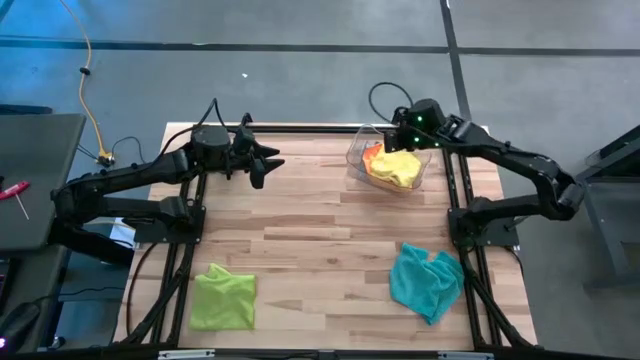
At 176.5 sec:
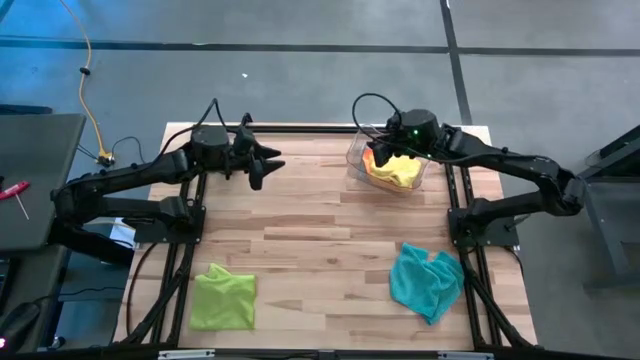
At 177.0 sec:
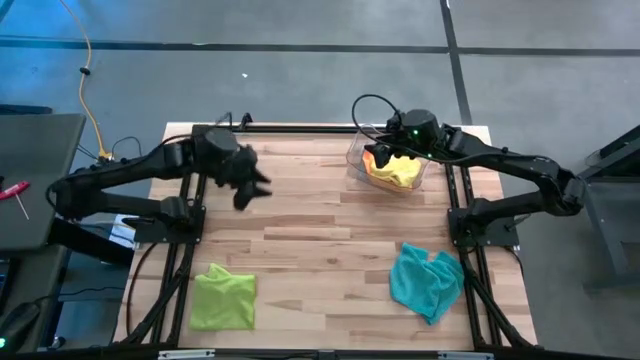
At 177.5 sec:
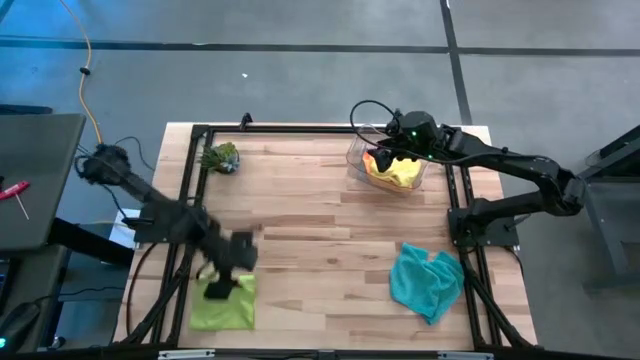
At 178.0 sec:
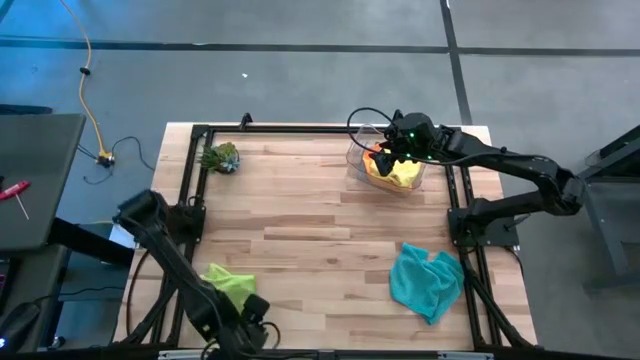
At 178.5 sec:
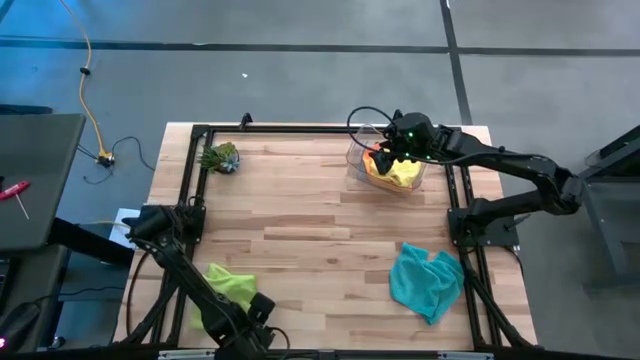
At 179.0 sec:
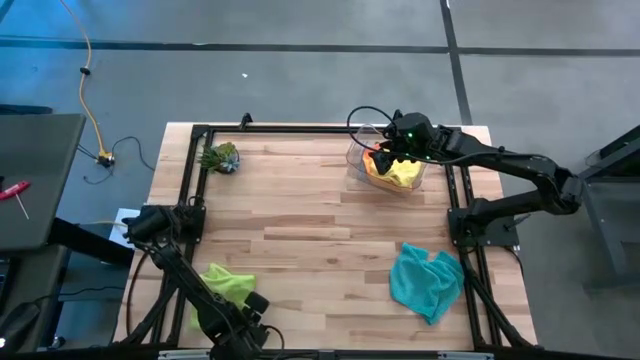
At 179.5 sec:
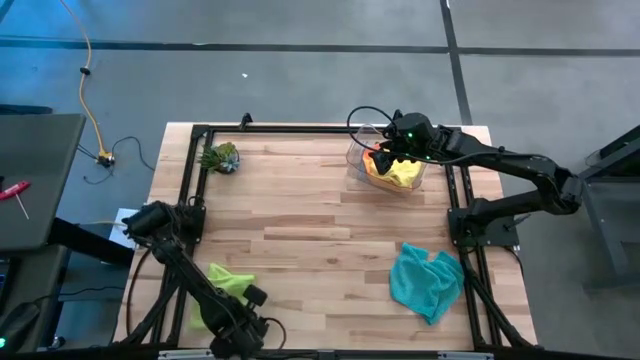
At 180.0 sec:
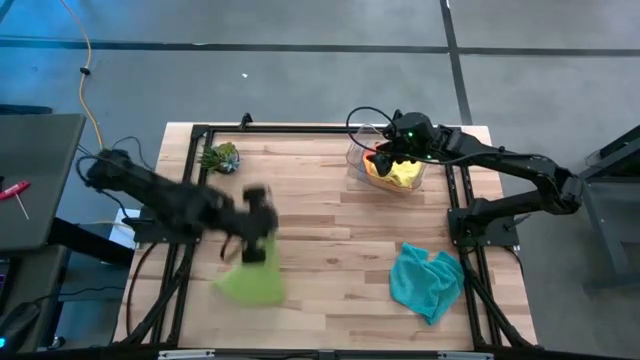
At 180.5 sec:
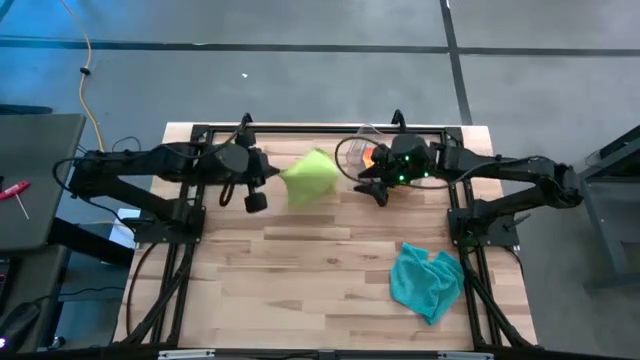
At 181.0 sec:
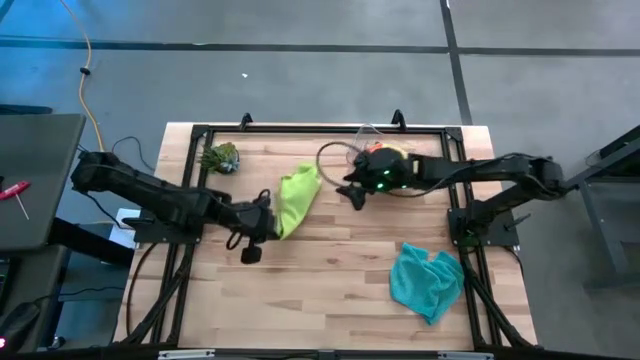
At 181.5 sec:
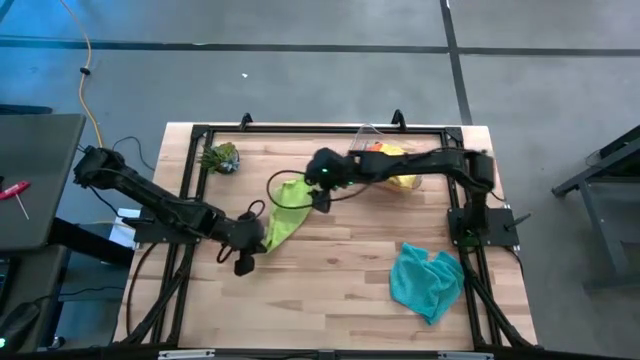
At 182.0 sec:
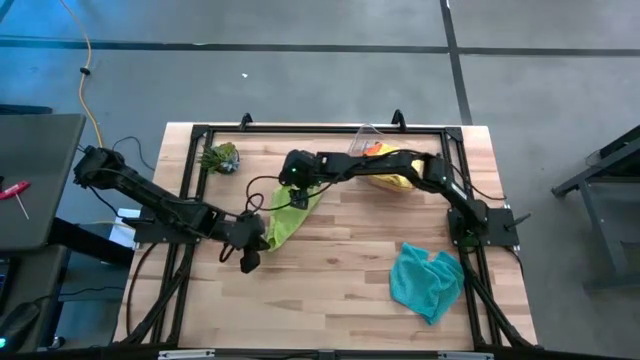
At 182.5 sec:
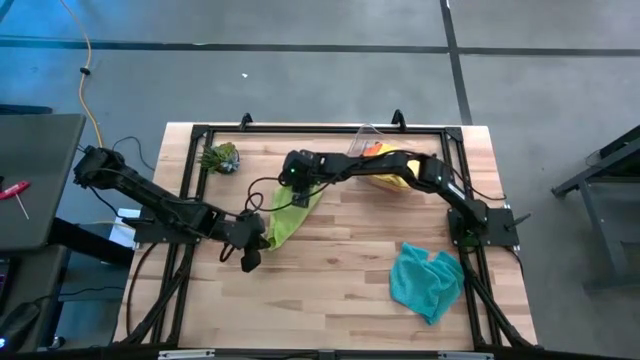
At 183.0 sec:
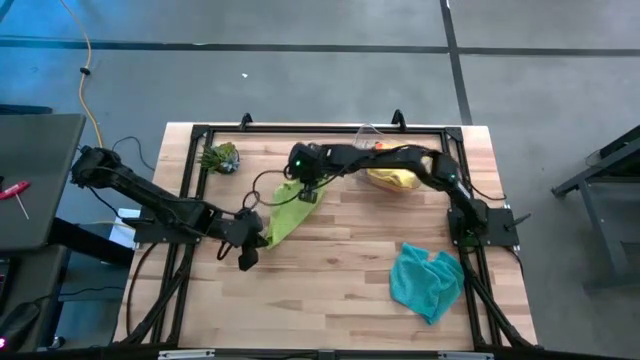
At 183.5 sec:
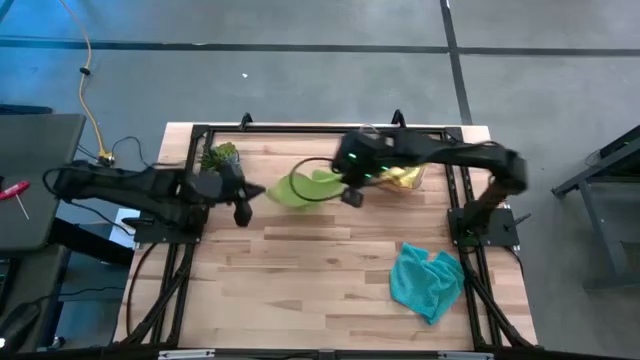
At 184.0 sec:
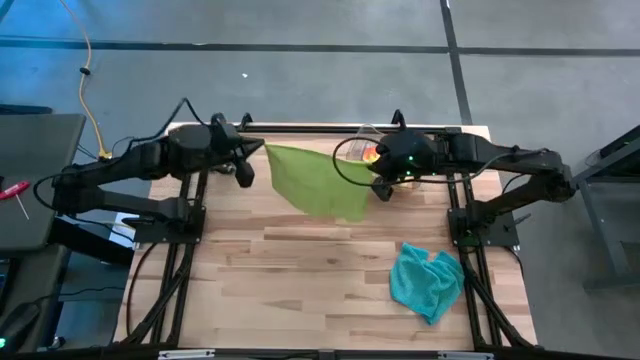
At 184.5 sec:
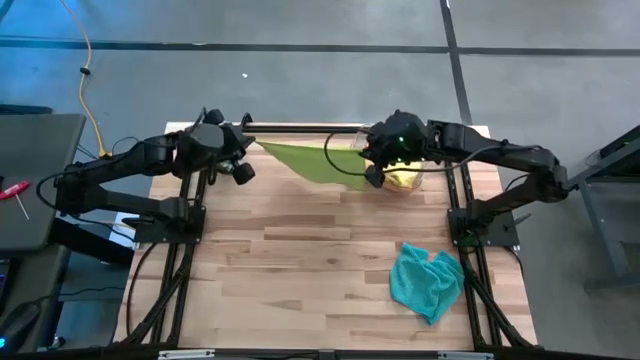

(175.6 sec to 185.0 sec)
Task: Fold microfiber towels
Fold the green microfiber towel

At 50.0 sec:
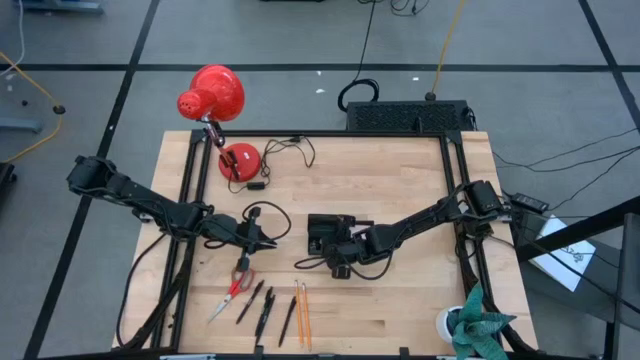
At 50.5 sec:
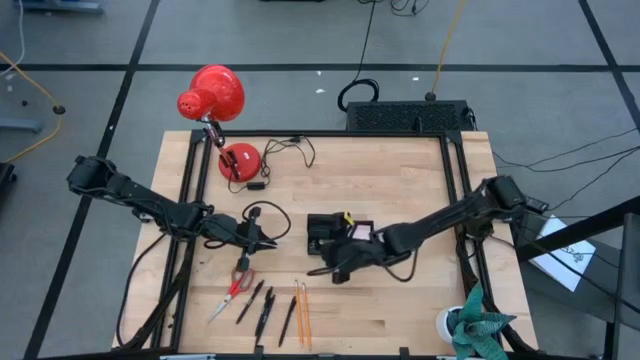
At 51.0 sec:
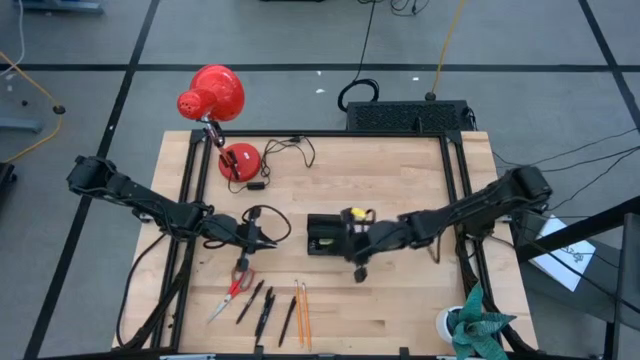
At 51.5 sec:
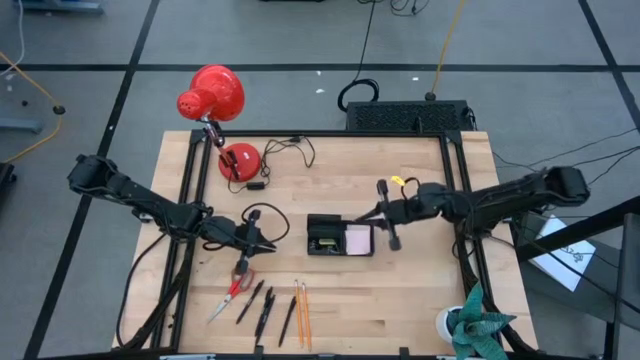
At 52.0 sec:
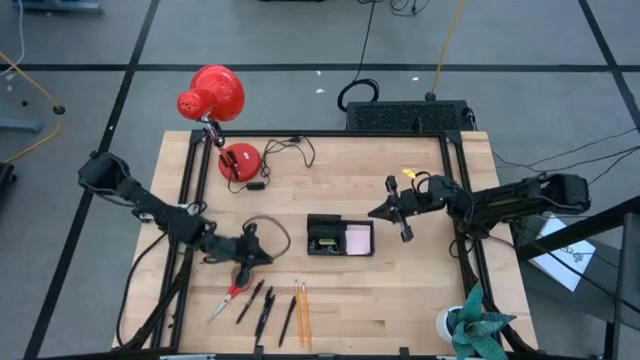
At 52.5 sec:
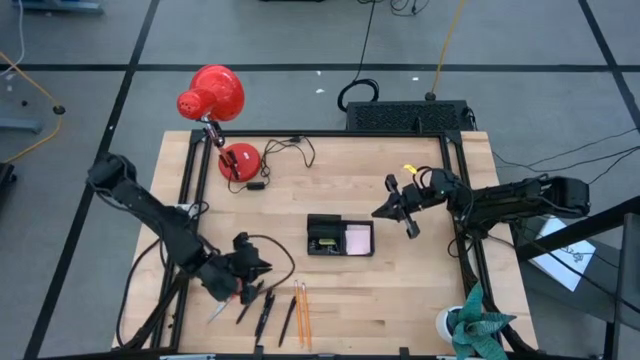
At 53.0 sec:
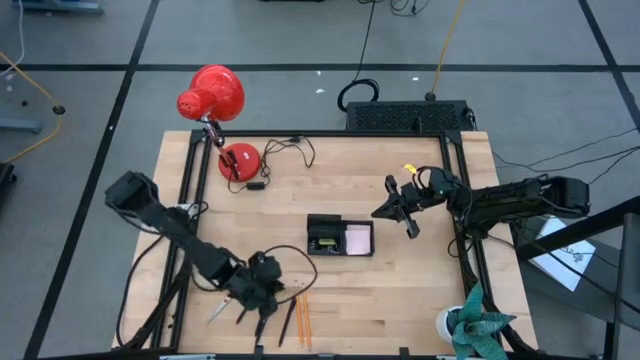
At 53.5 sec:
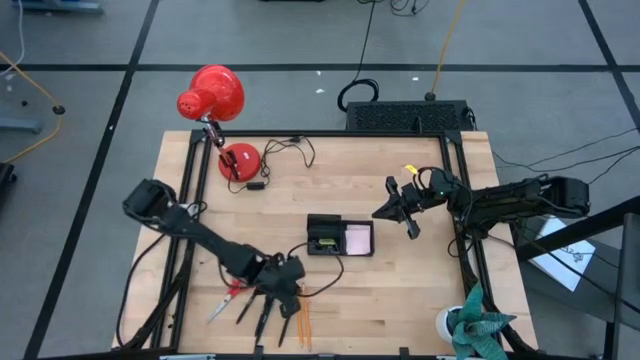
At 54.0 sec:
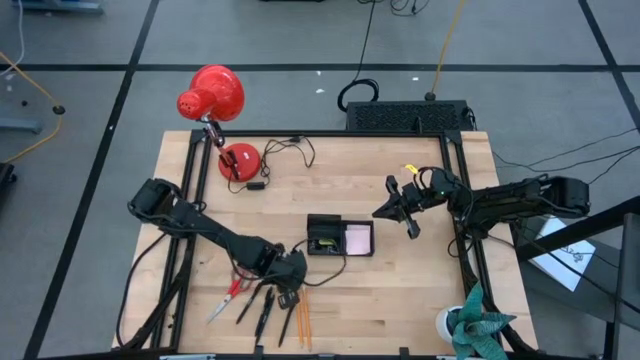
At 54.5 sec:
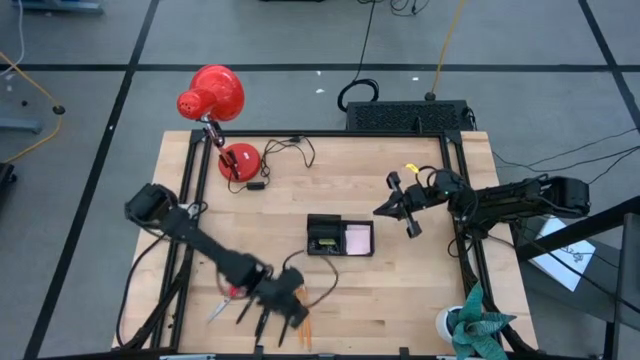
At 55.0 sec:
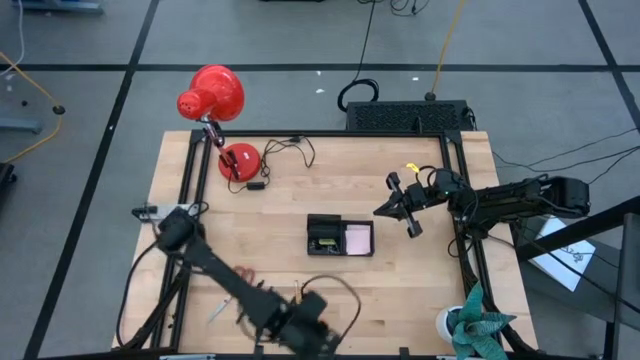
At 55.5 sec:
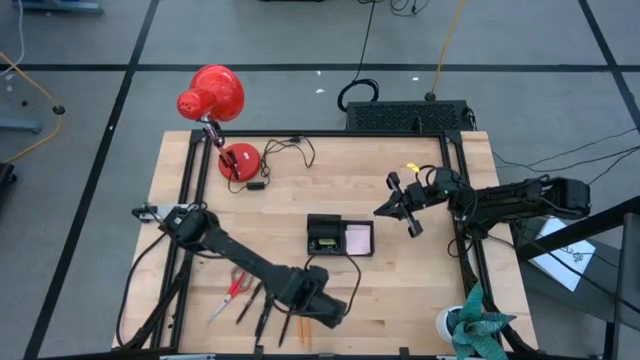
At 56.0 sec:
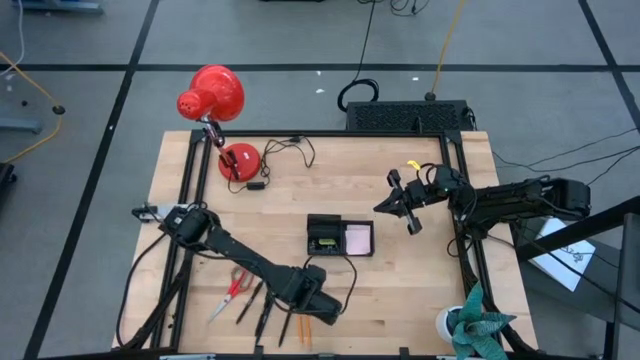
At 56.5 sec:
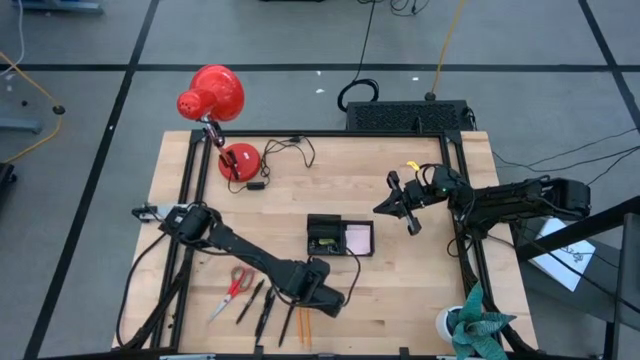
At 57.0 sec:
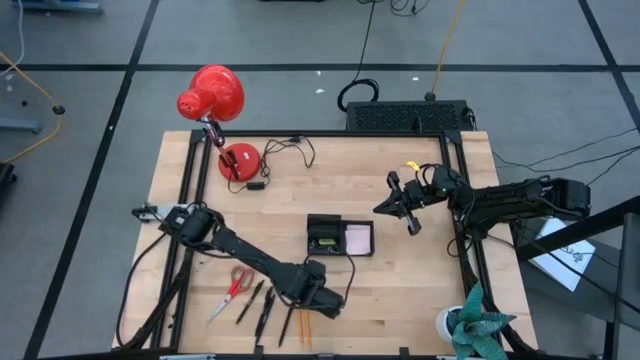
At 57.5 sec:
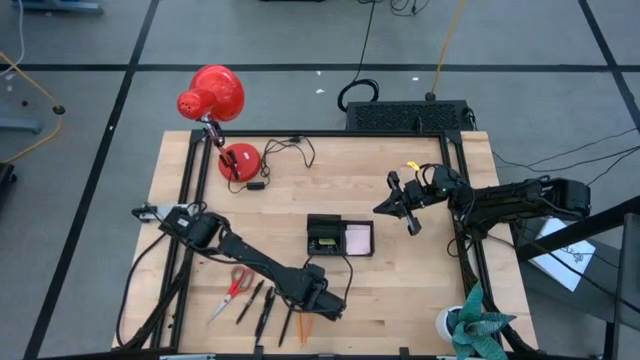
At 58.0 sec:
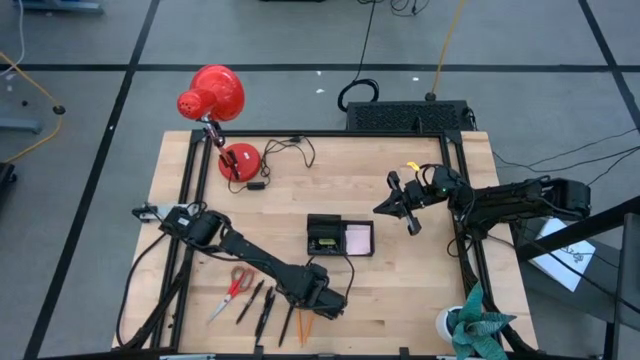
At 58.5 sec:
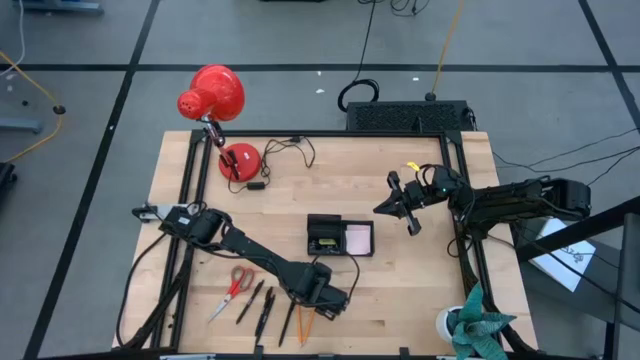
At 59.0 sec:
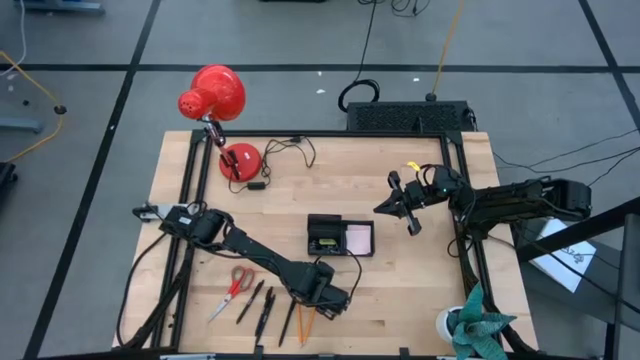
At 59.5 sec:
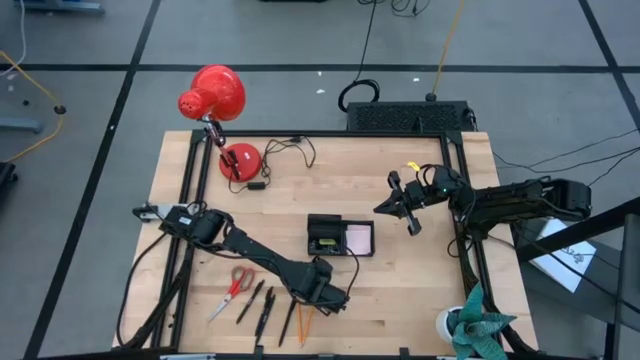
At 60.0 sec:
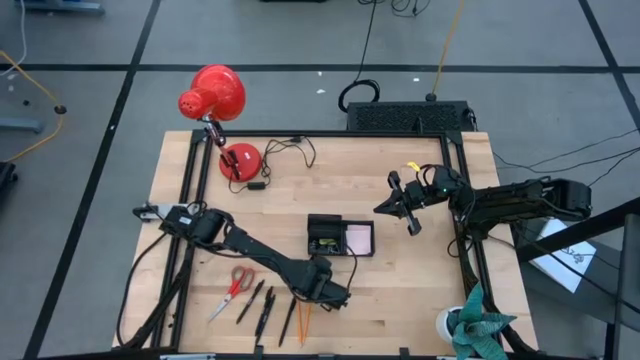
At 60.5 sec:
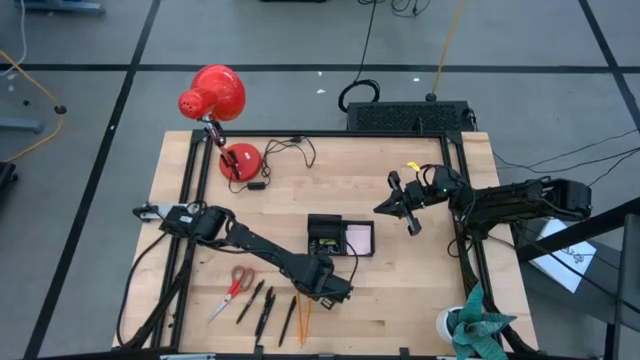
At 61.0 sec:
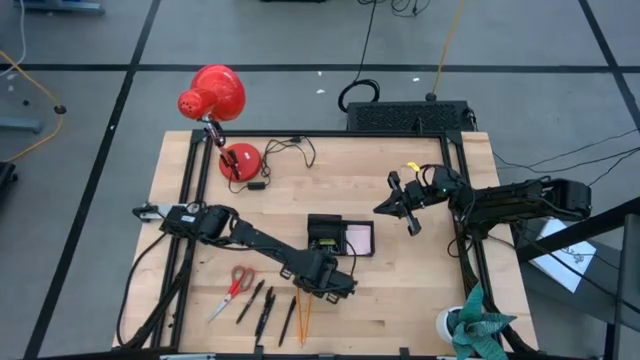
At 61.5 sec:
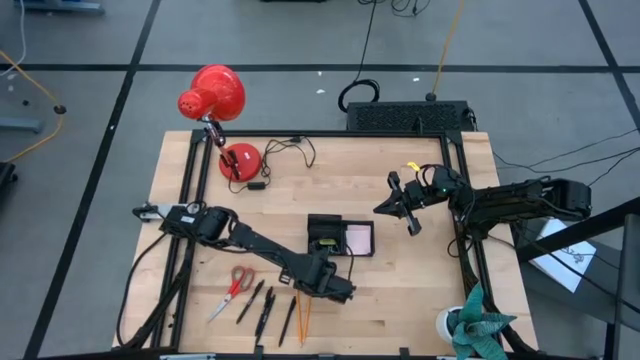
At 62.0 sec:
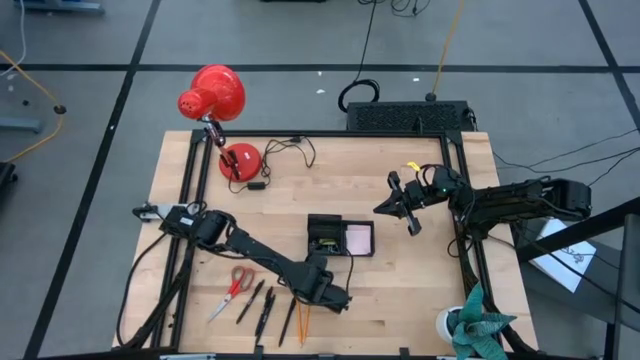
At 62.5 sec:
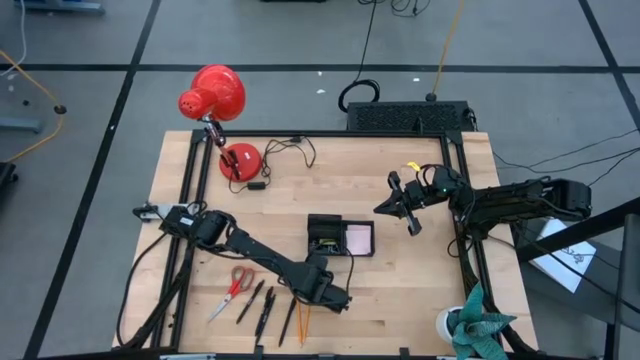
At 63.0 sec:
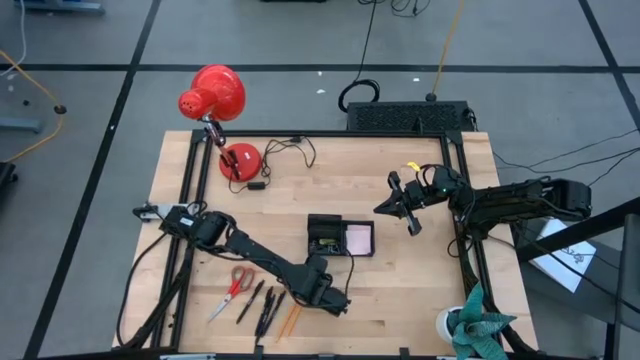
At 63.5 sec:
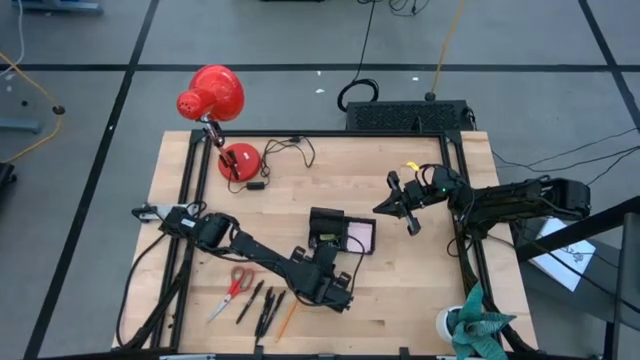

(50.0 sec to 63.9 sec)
Task: Pick and place office supplies into organizer
Put the orange pencil into the black desk organizer
